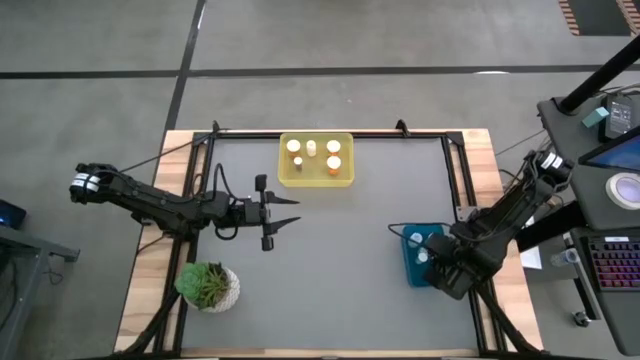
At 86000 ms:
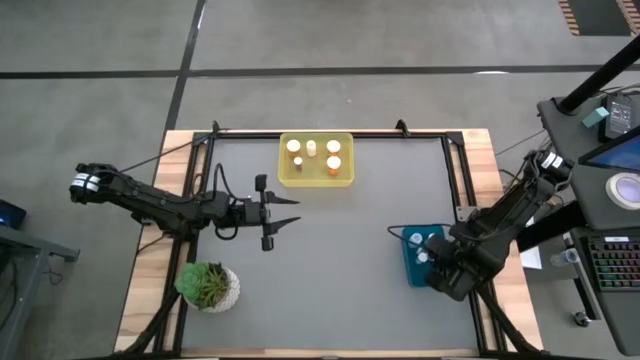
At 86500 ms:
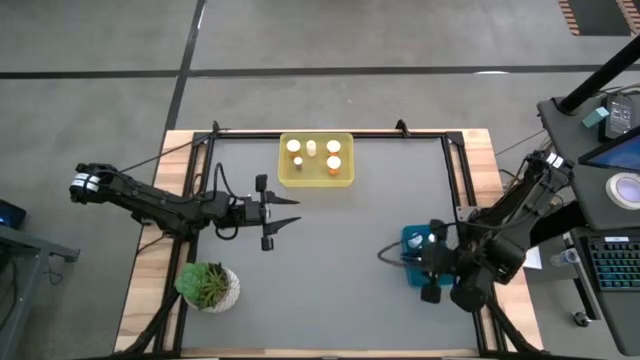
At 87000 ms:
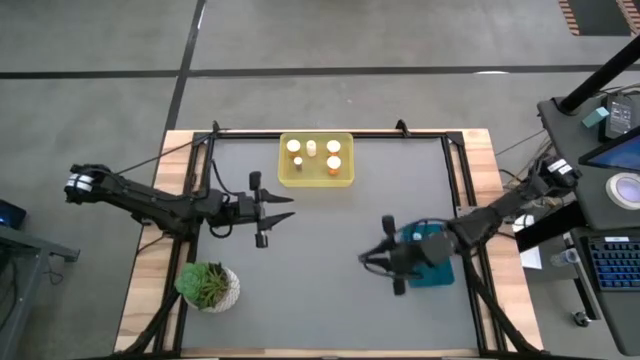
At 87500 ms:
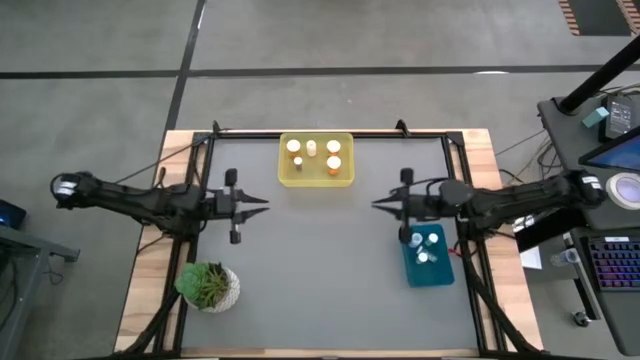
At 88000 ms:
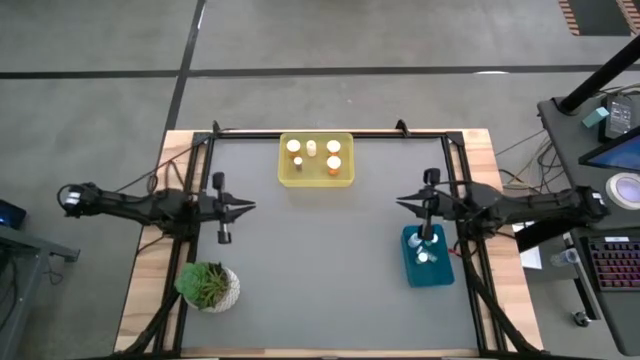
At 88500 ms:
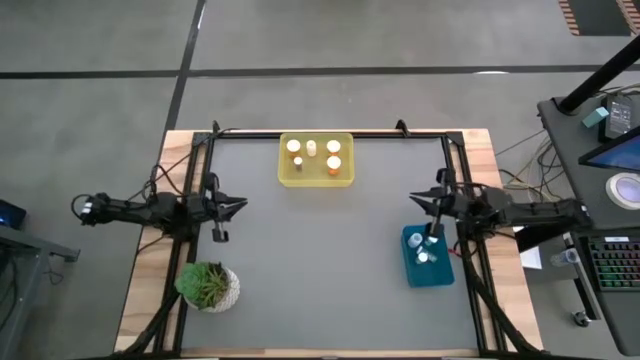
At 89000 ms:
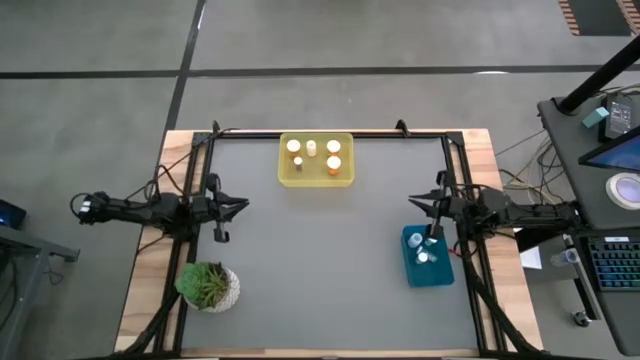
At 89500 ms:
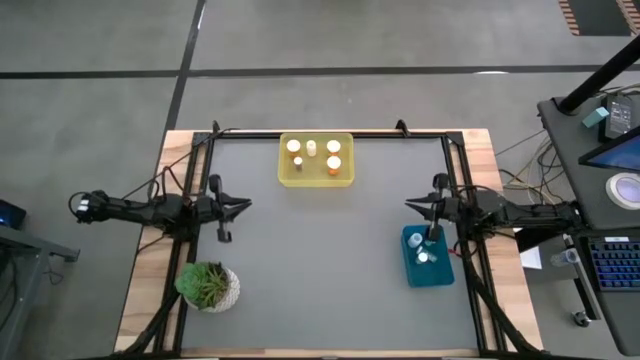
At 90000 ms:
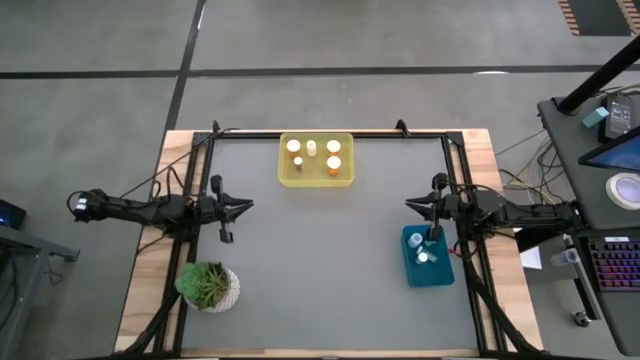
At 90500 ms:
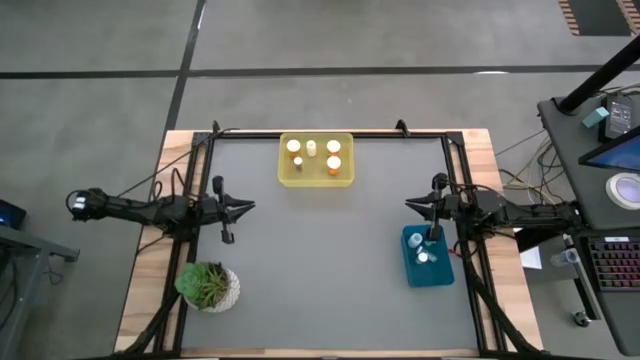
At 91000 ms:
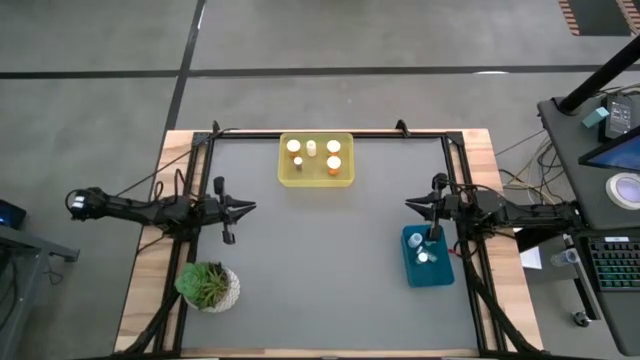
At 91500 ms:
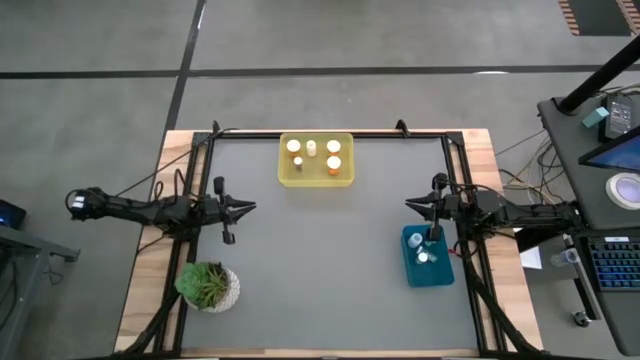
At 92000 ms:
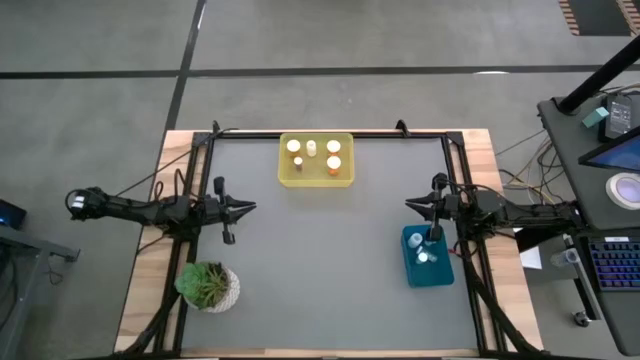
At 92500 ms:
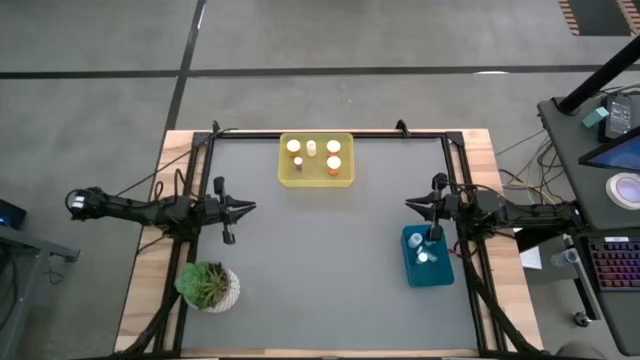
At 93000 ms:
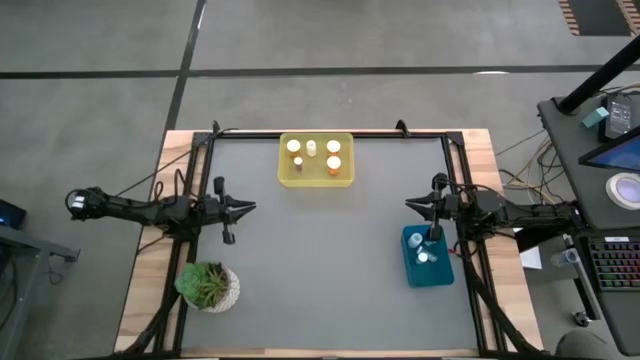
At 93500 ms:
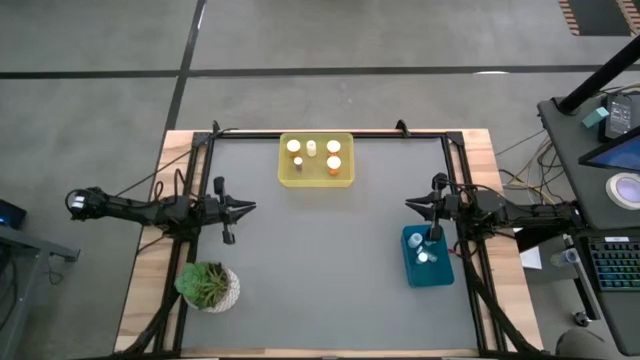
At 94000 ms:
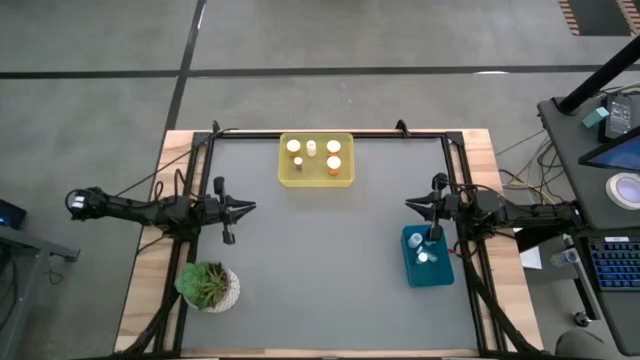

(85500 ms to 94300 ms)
Task: Pick and place medicine bottles into bin by pill shape (circle, oval)
Return to Home Position

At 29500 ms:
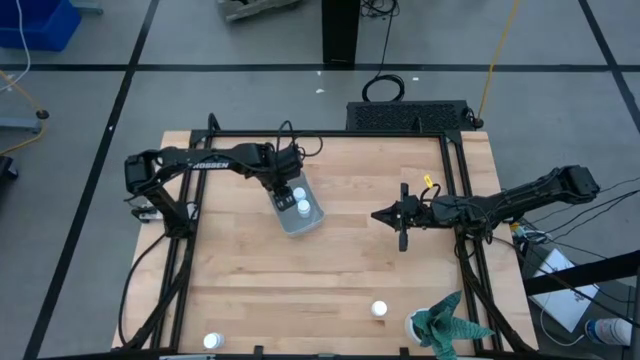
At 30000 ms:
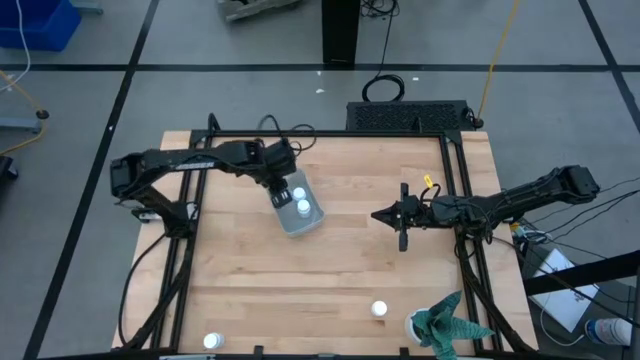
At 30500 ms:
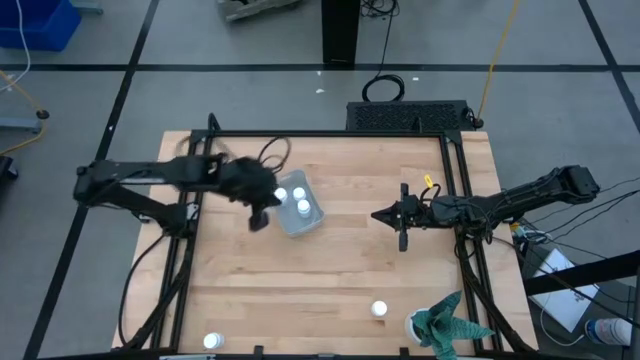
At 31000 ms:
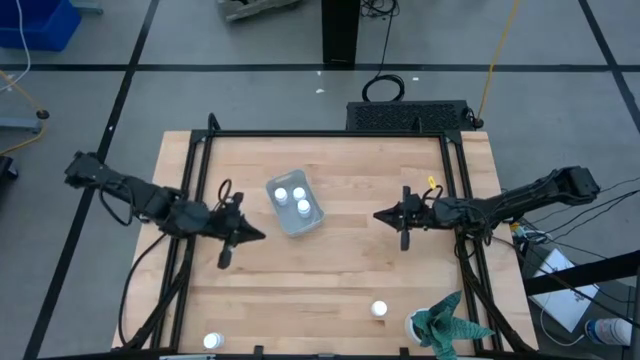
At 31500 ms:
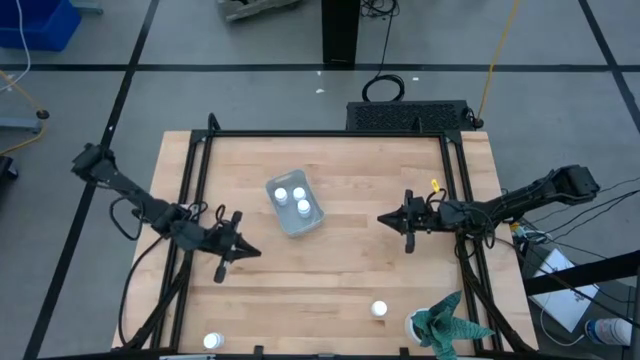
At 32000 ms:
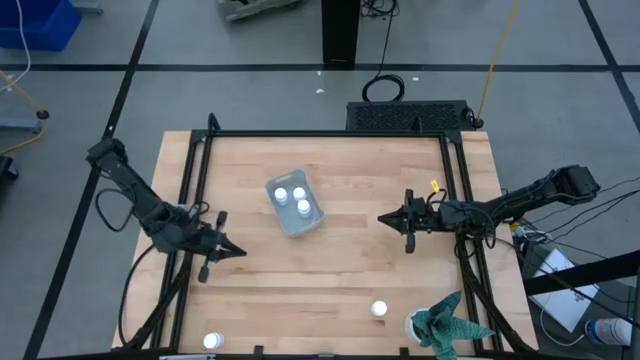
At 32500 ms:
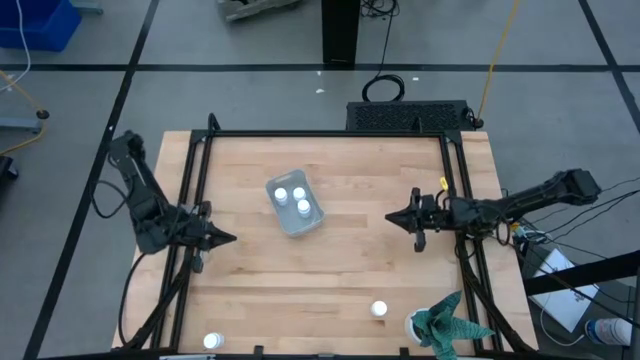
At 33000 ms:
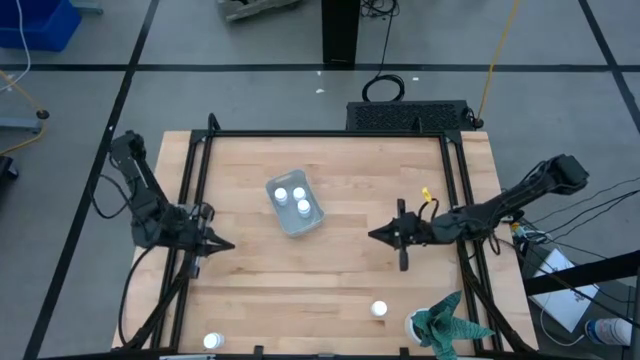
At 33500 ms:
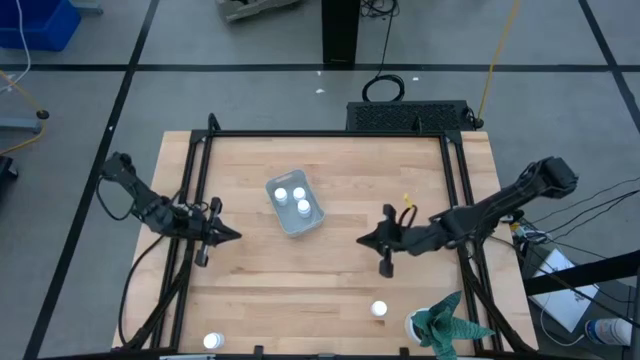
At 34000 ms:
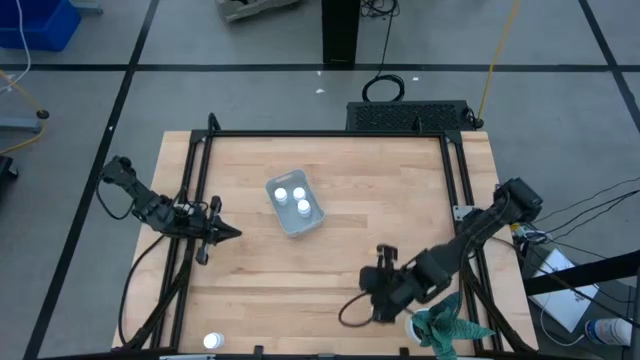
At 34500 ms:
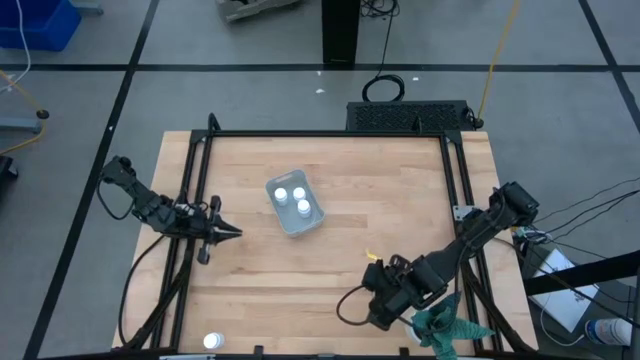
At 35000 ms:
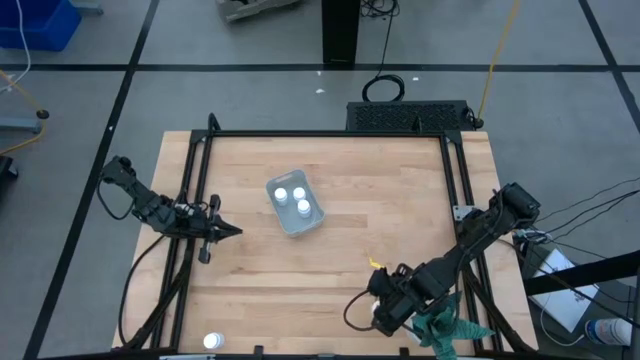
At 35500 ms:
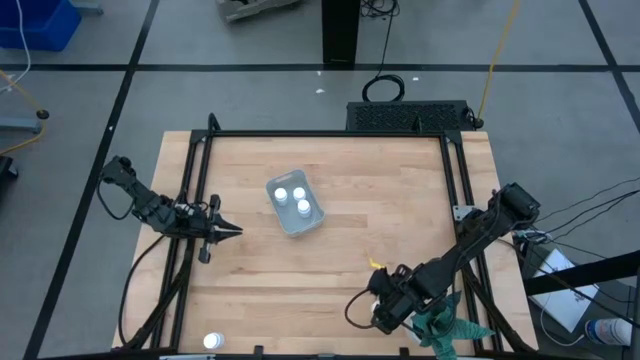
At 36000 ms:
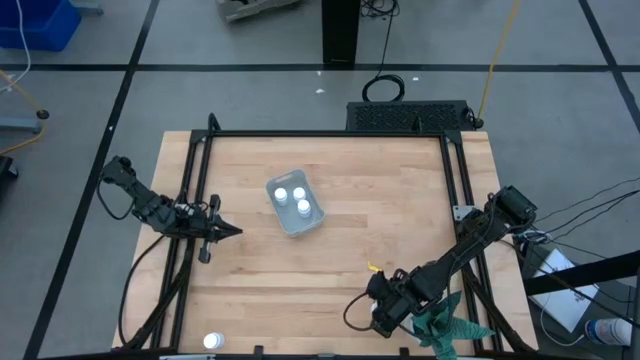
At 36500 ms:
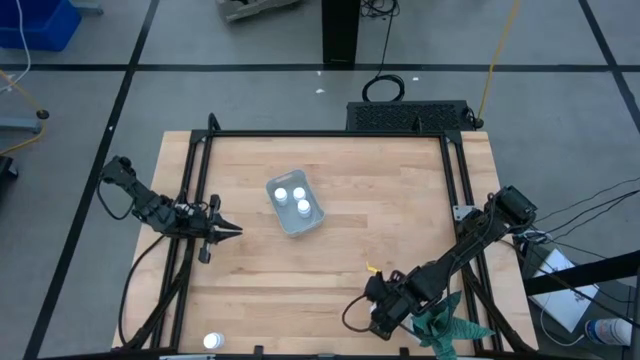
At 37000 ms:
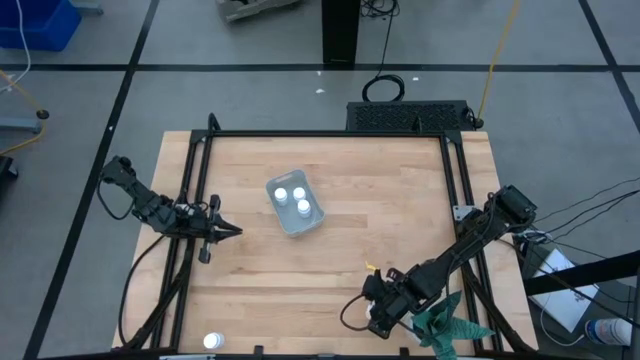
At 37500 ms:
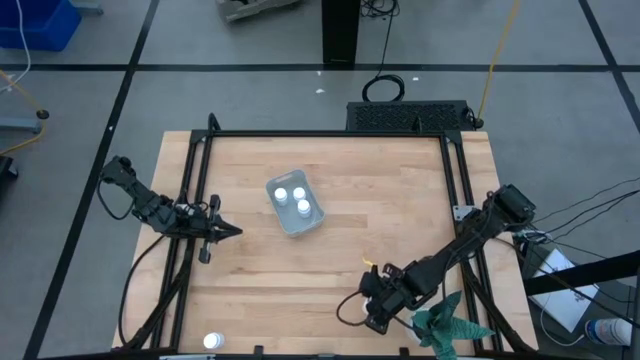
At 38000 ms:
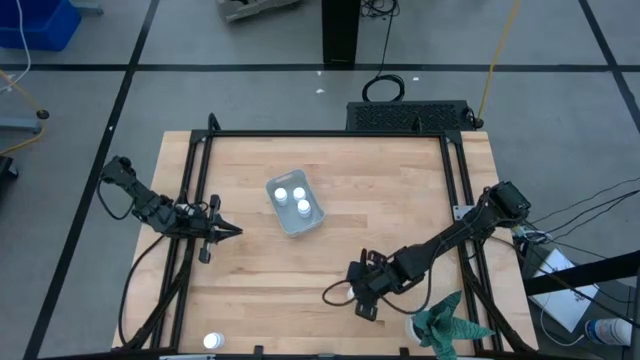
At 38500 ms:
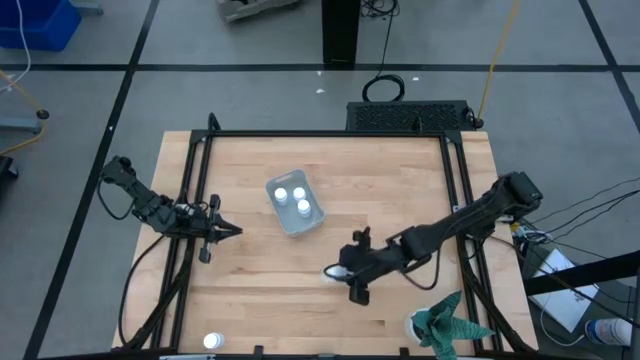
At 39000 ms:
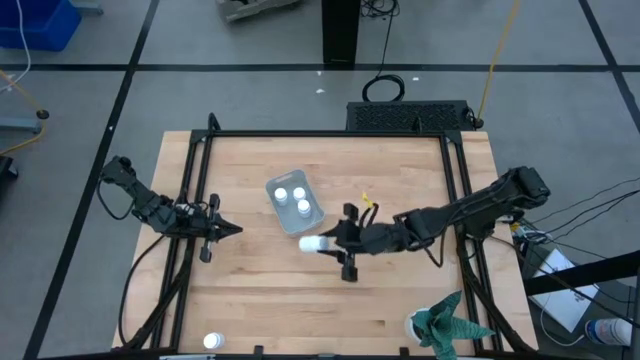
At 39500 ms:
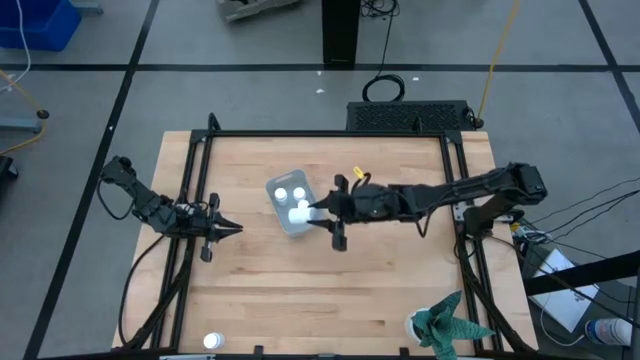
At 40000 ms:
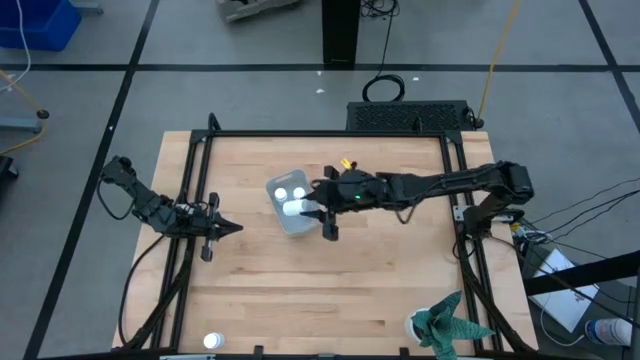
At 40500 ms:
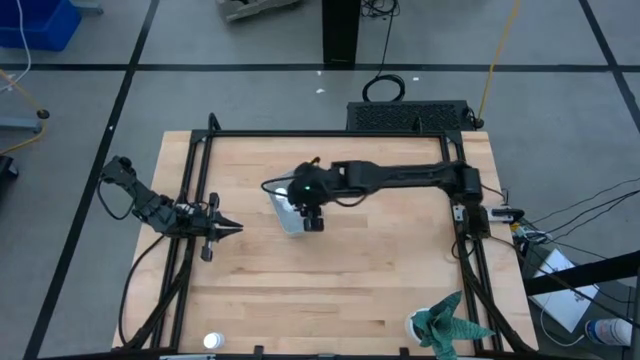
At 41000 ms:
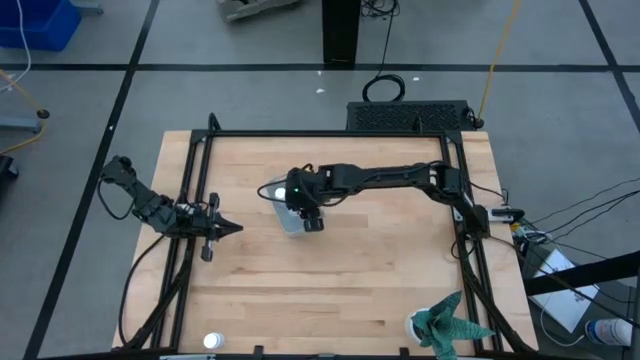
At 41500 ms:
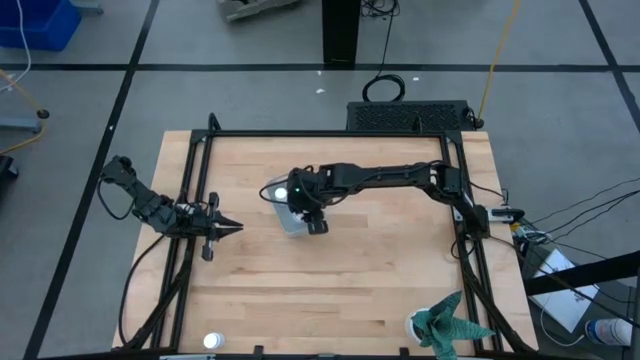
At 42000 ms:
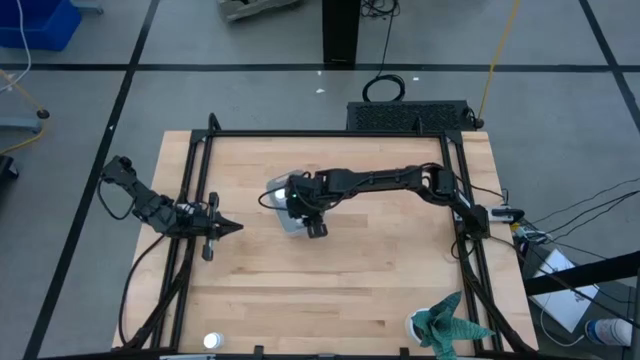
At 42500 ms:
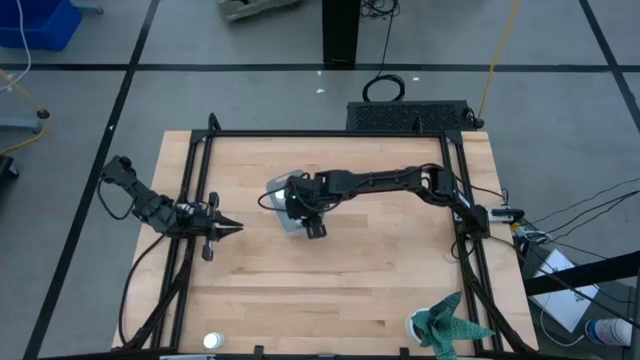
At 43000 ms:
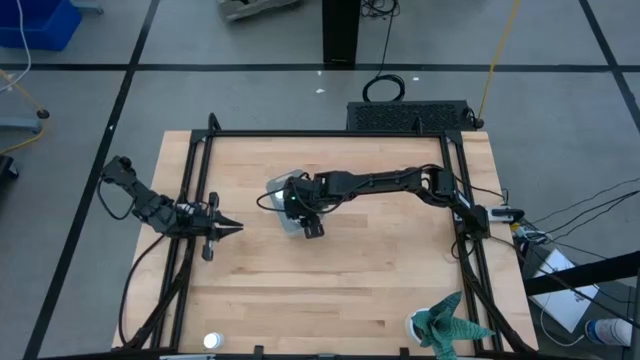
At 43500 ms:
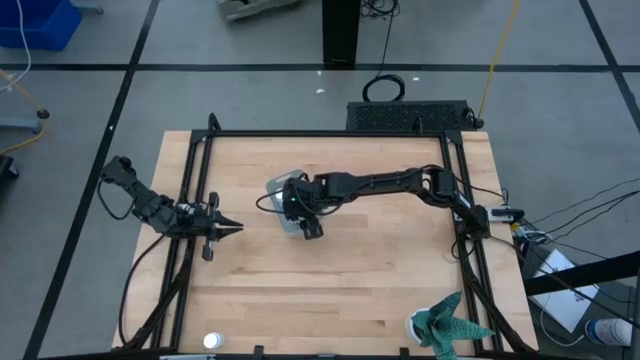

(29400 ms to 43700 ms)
Task: Pick and place pill bottles into a basket
Put the white pill bottle into the gray bin
